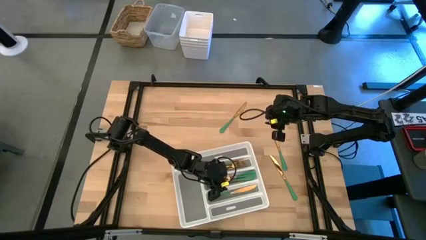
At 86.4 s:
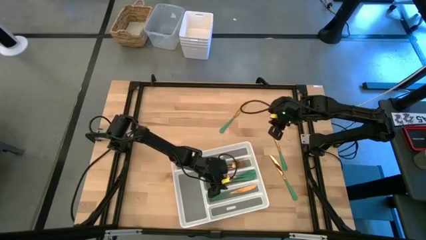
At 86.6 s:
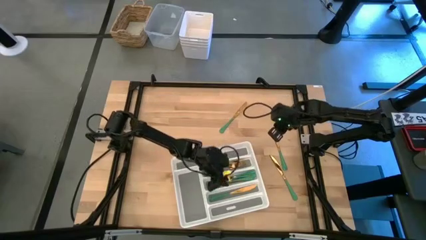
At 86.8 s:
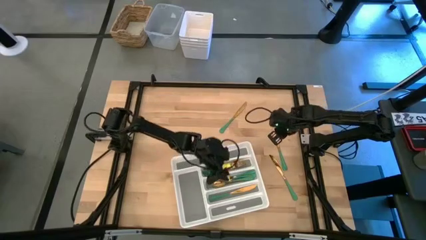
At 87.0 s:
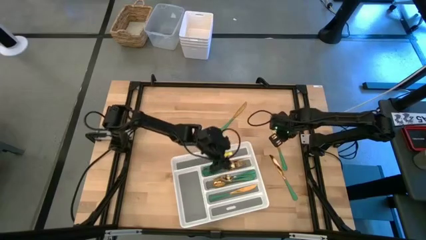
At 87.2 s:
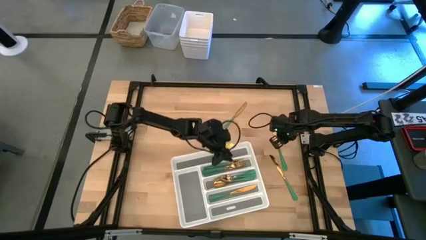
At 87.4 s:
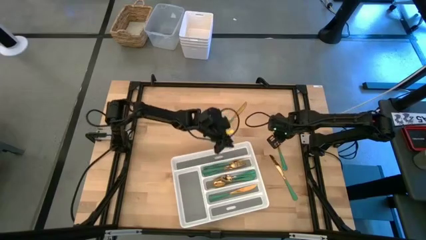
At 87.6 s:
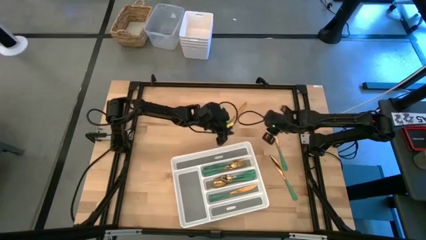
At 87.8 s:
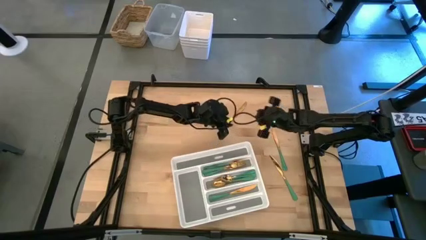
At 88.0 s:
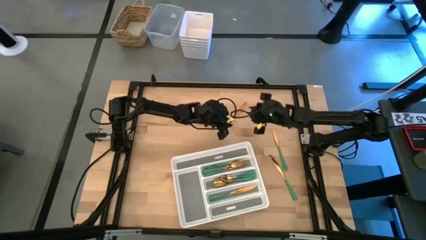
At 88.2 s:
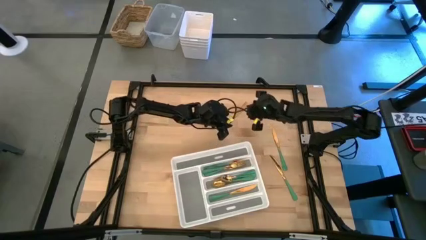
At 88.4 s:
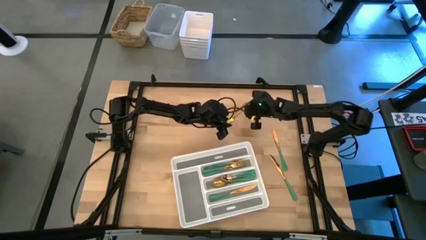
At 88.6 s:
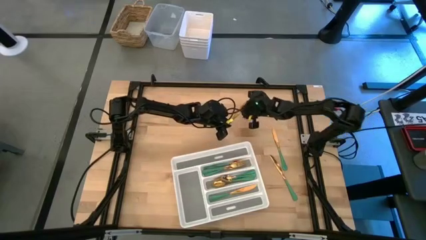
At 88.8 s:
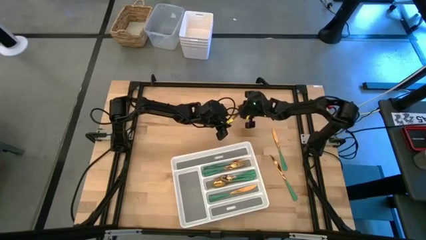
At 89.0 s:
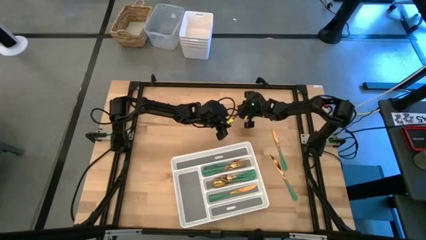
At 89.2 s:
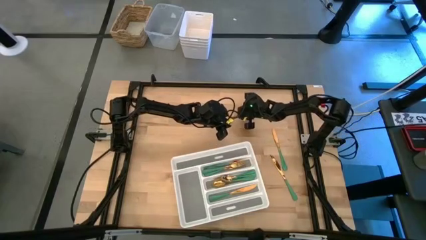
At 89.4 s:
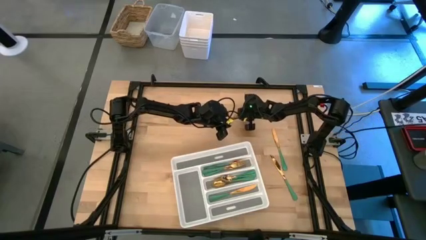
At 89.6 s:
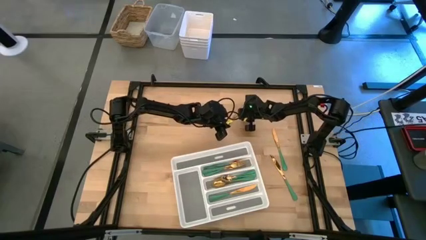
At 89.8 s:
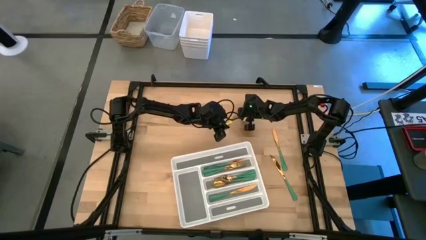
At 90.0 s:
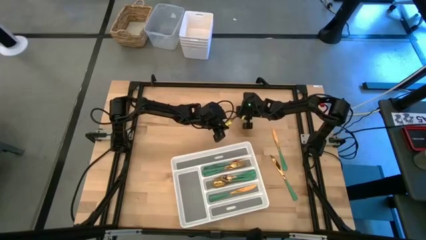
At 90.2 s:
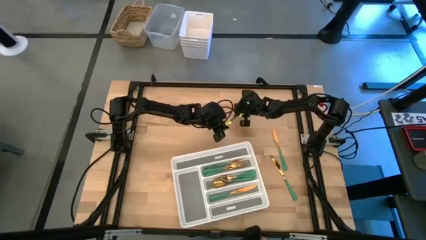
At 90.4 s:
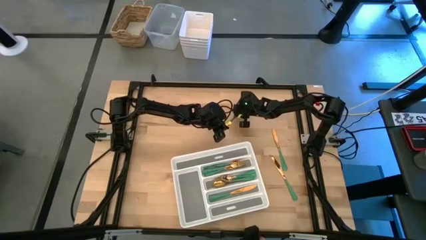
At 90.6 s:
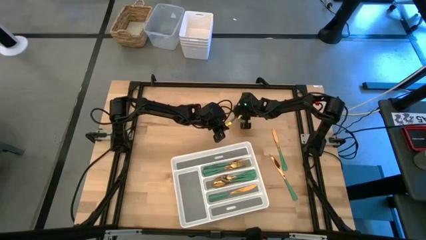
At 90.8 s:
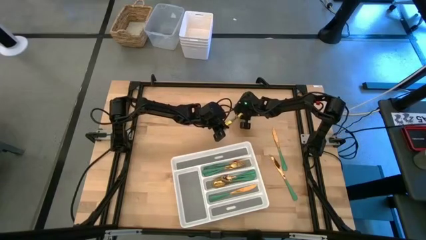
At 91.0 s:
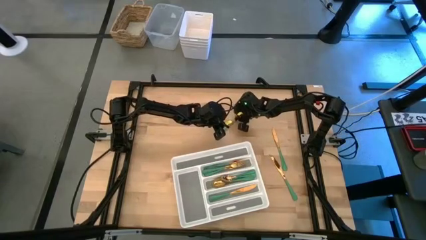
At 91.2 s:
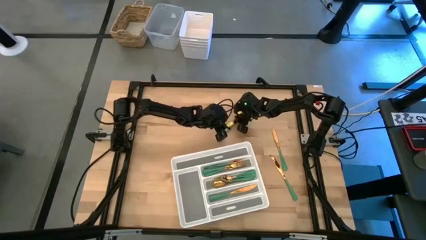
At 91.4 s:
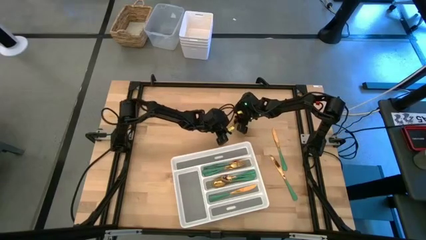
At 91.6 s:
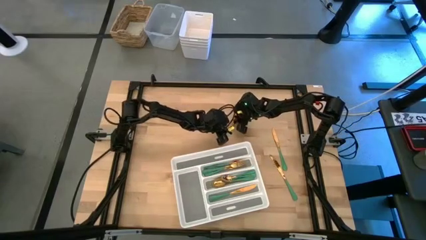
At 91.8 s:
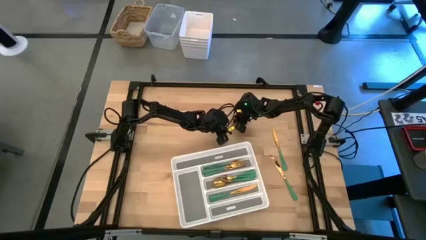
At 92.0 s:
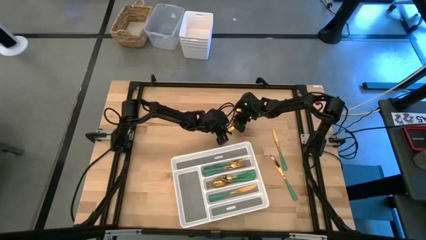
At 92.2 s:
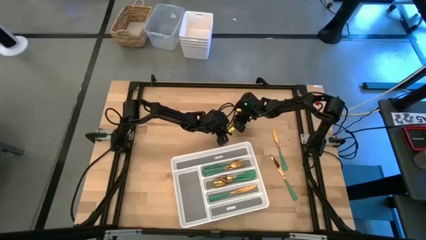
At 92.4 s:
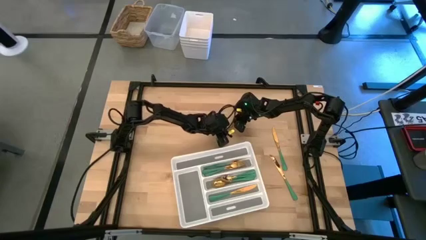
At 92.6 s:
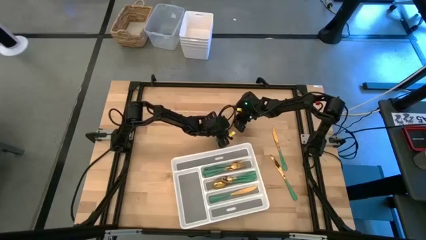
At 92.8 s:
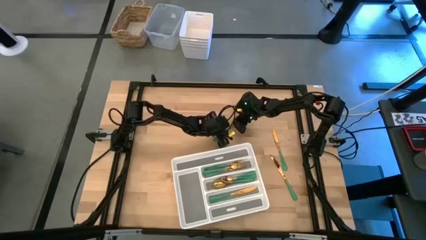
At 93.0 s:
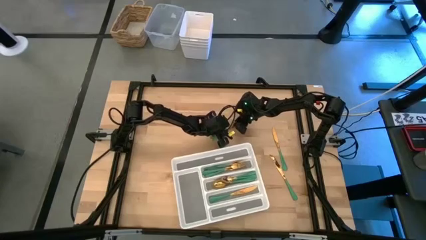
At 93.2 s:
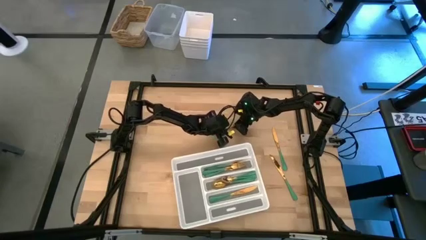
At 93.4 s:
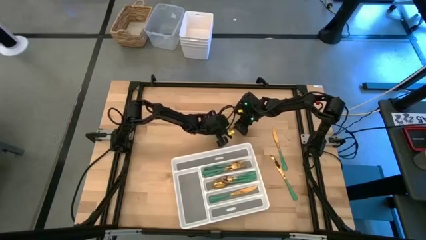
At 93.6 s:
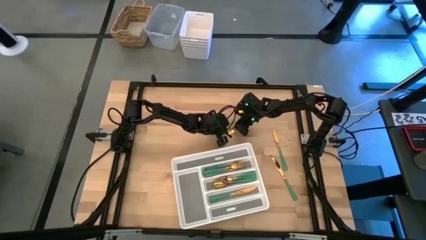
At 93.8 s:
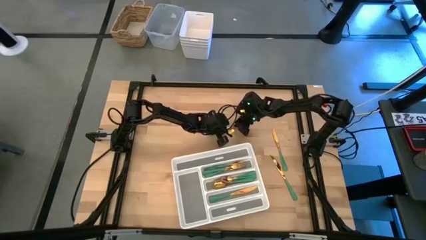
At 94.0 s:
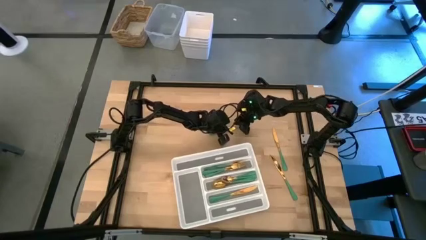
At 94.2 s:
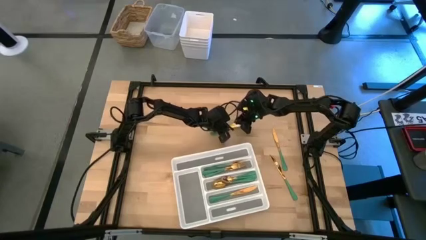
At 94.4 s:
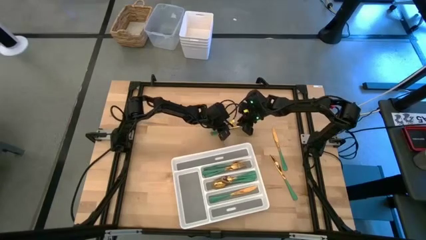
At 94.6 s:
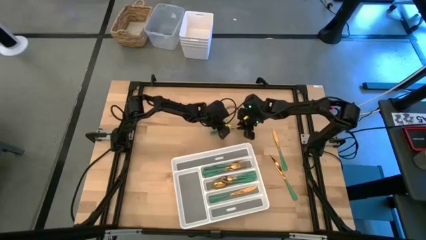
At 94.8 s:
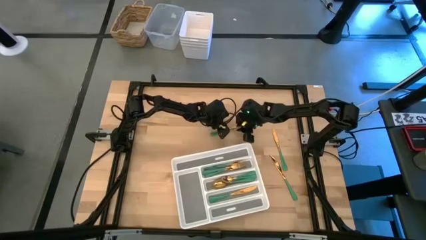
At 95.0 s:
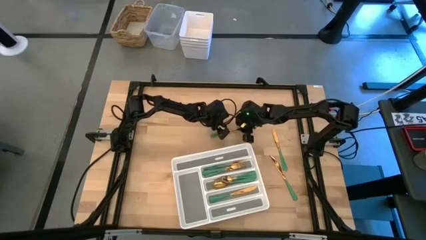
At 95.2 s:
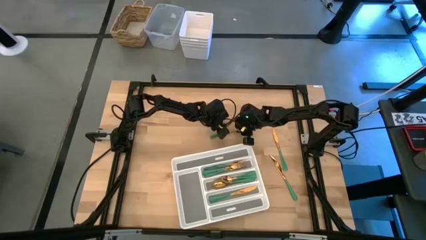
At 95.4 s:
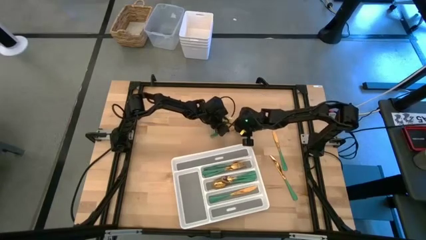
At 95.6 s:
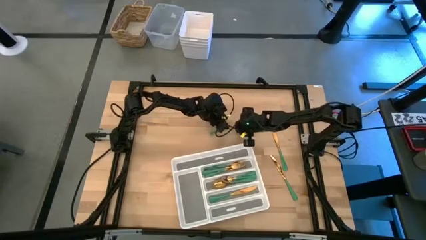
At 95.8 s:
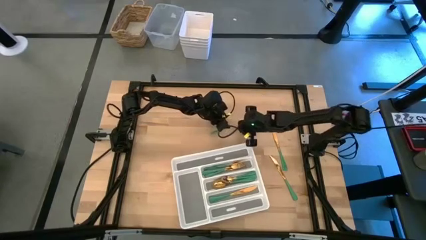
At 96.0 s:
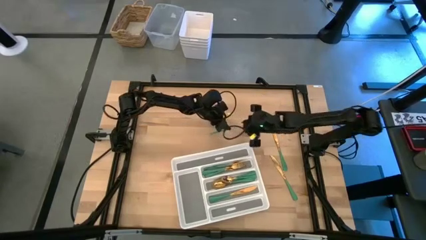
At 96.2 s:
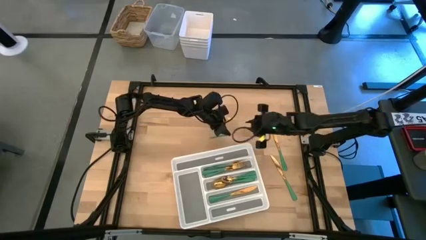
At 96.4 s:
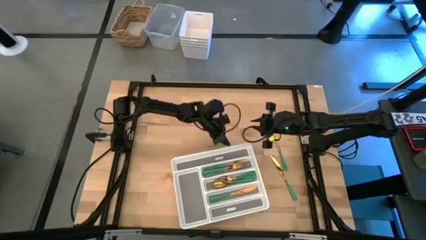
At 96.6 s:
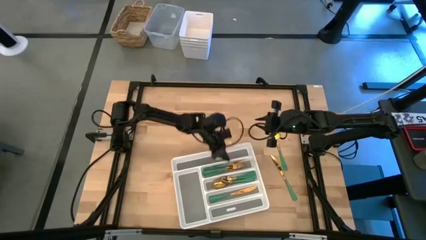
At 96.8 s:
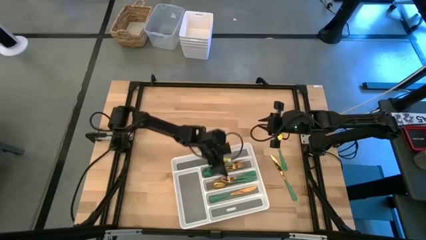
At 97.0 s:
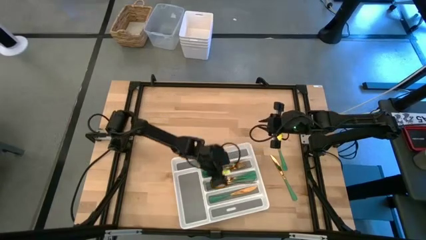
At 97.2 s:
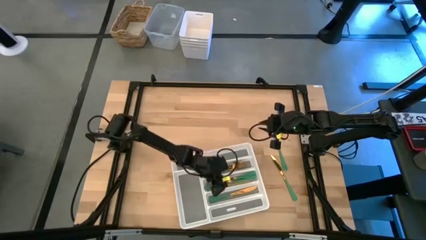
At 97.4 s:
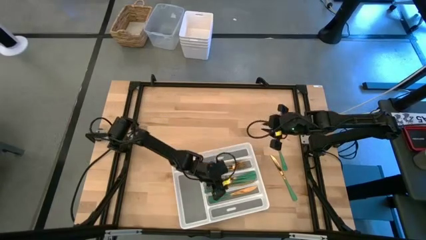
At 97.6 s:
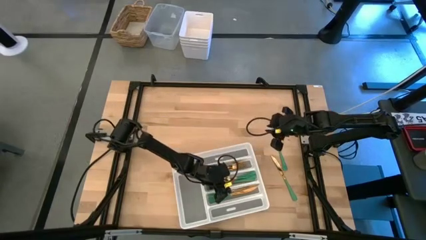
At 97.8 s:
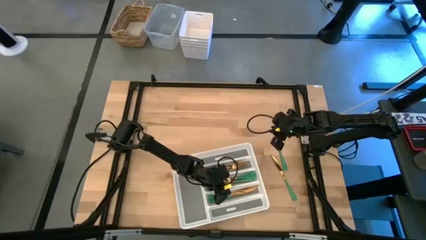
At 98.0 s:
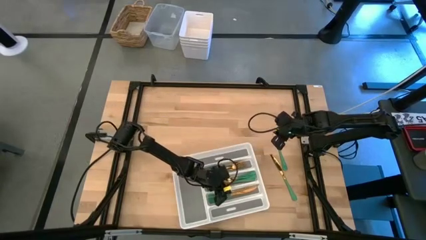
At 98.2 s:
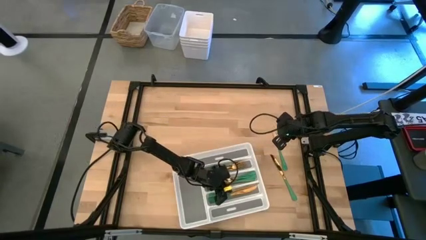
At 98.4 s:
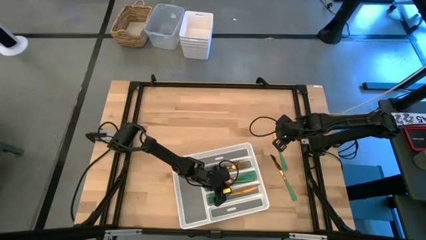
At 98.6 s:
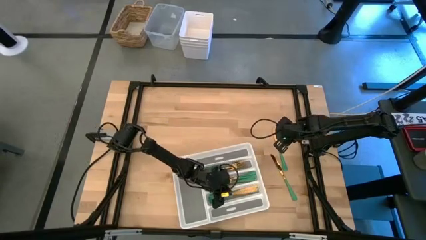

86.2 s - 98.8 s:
Task: Sort silverware
Put the green knife into the white silverware tray

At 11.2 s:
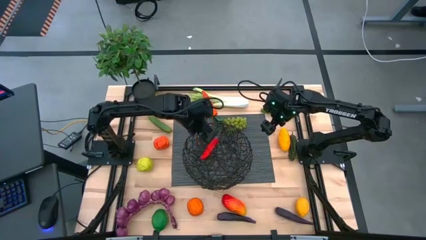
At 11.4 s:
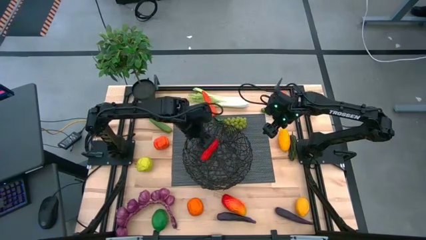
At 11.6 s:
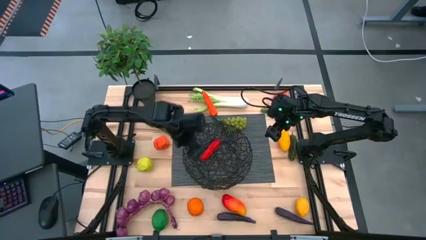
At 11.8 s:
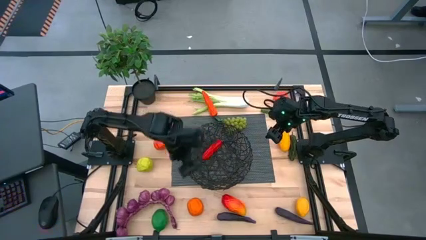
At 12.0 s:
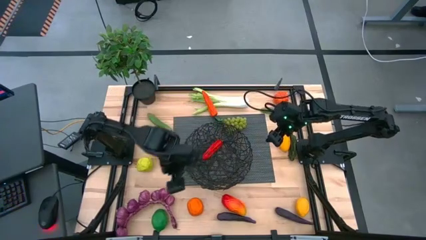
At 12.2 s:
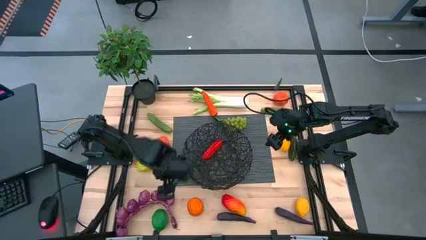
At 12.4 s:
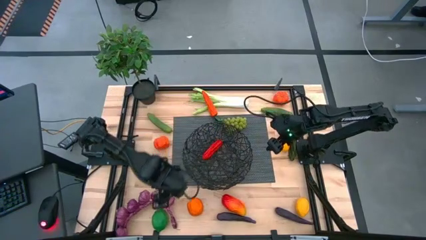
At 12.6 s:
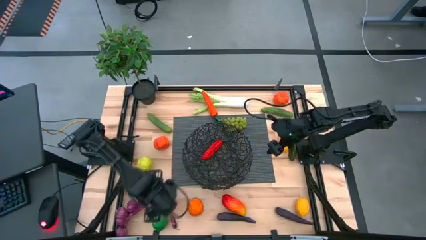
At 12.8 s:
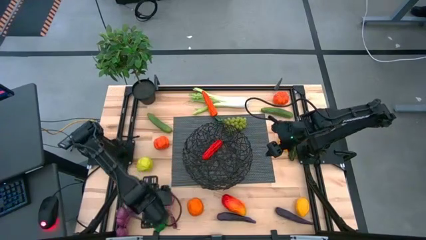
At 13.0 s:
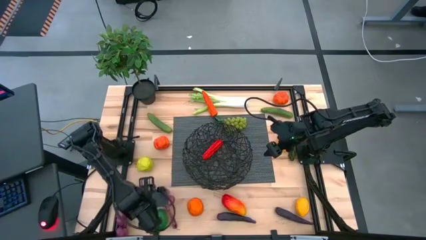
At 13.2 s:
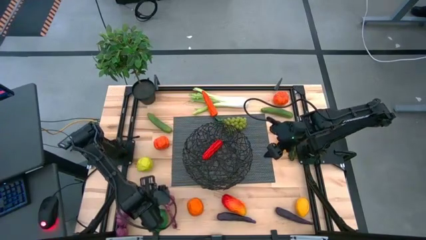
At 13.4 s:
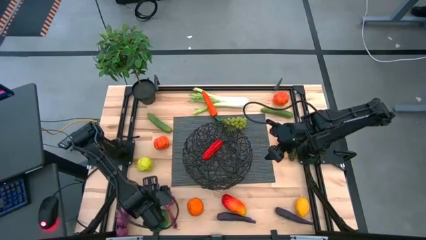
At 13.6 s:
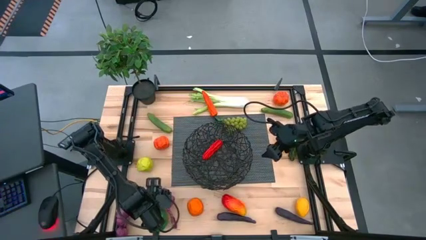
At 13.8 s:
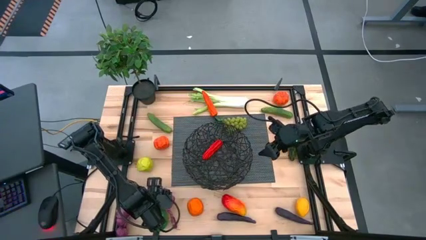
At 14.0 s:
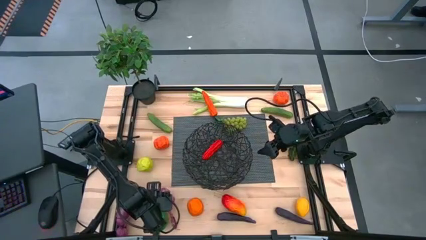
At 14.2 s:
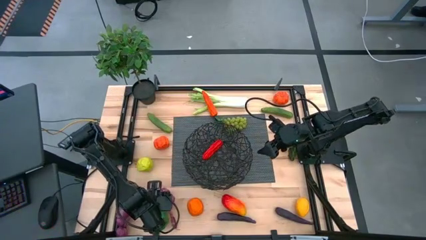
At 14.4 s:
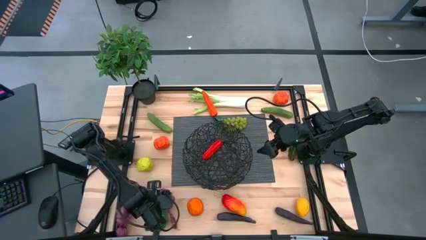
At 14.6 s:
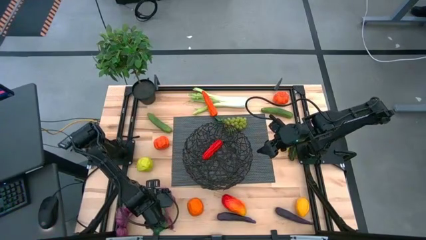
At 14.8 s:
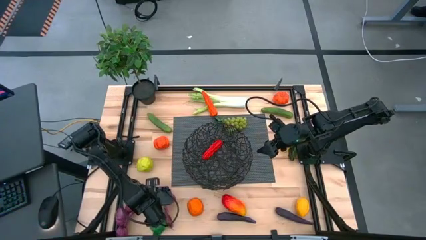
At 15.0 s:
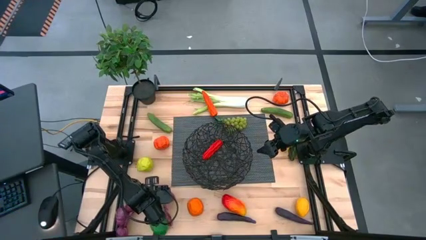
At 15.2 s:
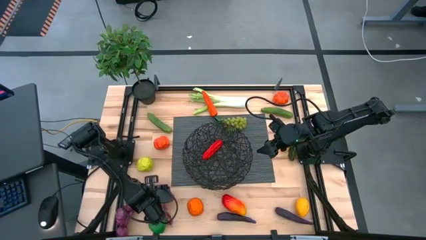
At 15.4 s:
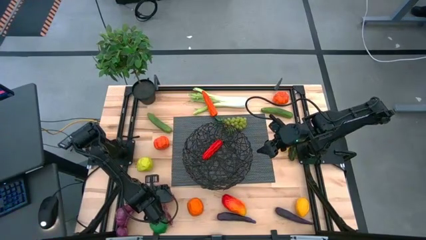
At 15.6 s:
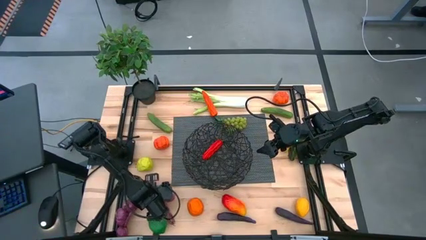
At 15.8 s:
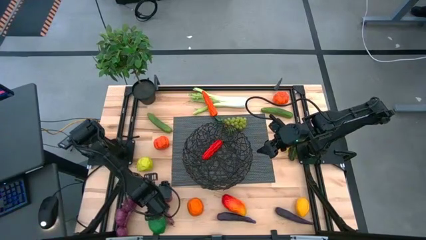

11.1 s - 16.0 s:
Task: Build produce basket
Put the purple garlic into the black wire basket
